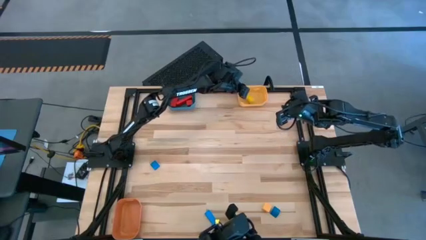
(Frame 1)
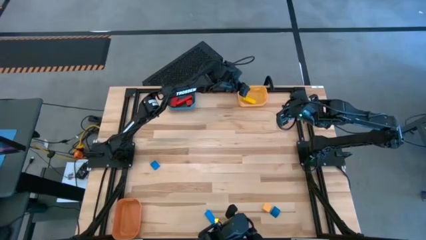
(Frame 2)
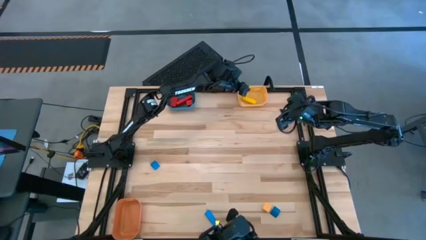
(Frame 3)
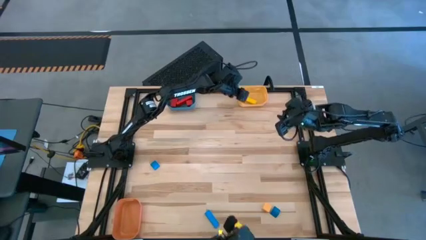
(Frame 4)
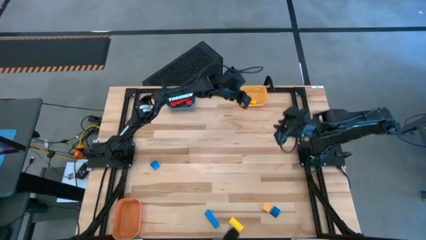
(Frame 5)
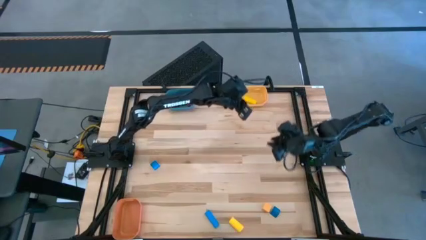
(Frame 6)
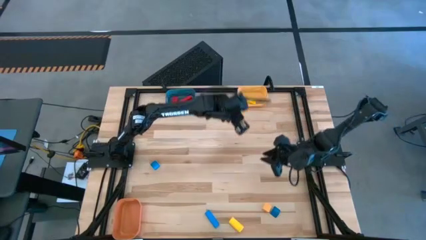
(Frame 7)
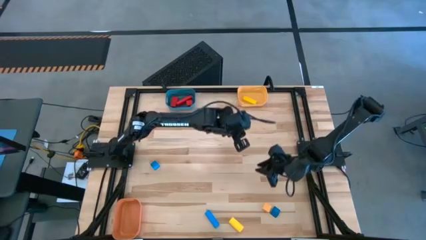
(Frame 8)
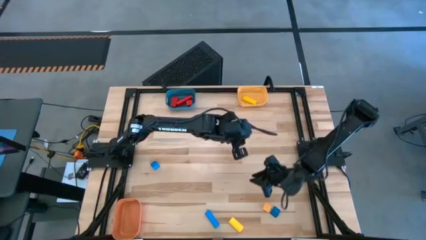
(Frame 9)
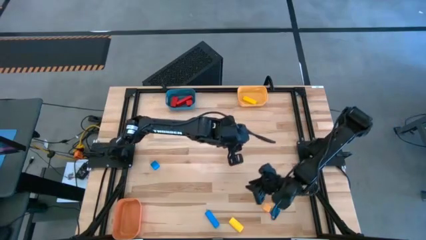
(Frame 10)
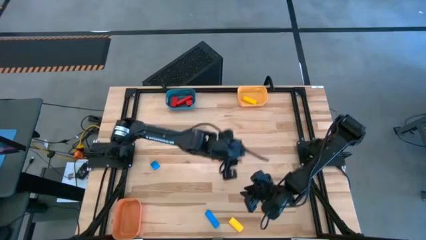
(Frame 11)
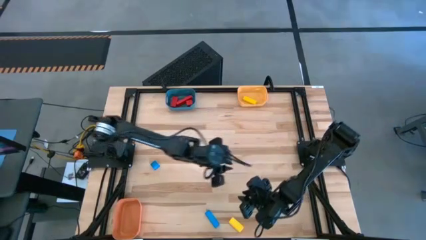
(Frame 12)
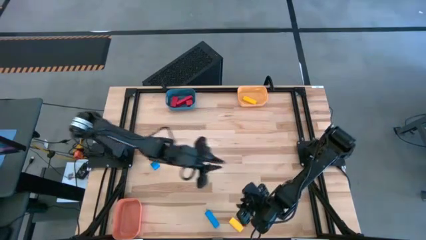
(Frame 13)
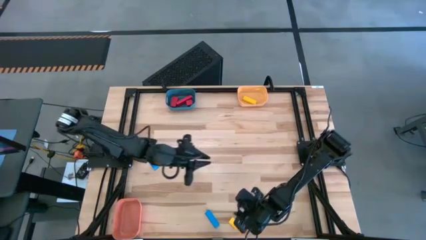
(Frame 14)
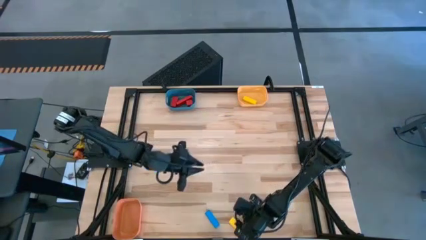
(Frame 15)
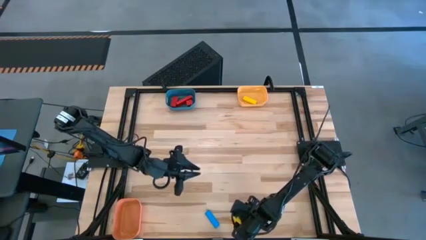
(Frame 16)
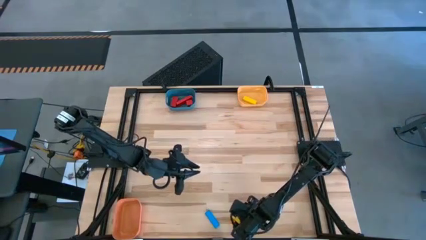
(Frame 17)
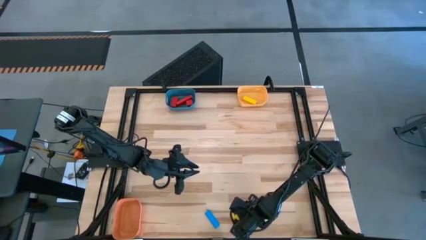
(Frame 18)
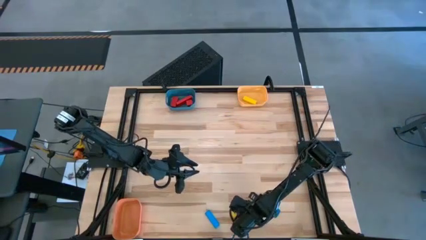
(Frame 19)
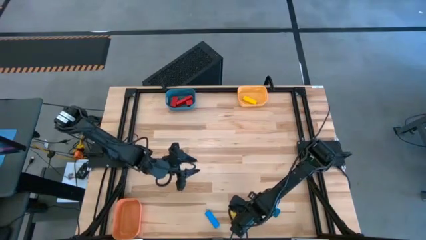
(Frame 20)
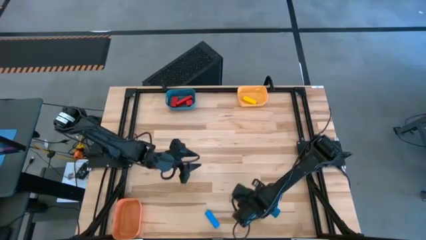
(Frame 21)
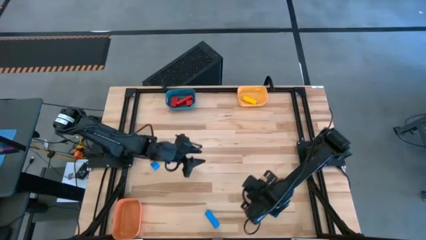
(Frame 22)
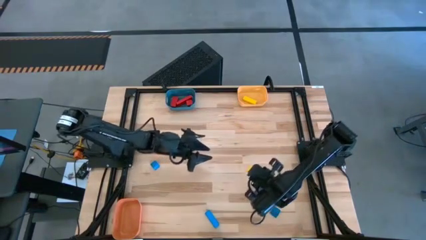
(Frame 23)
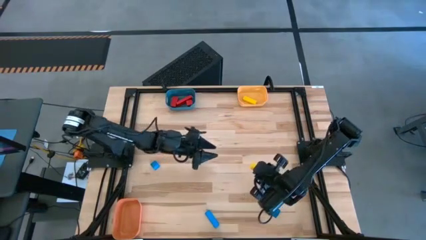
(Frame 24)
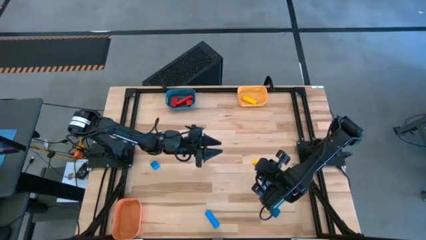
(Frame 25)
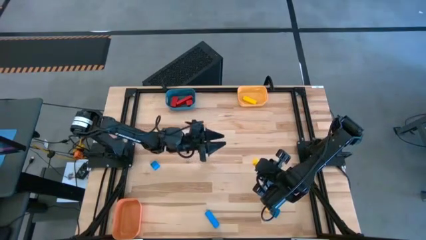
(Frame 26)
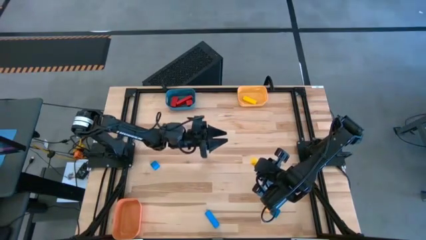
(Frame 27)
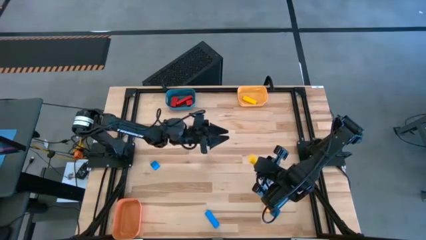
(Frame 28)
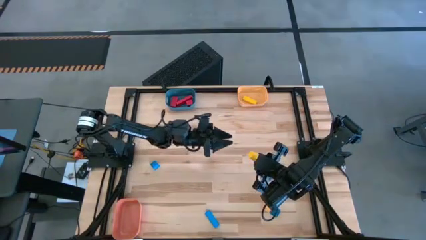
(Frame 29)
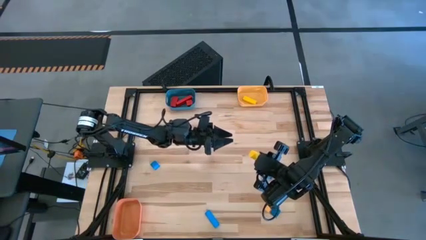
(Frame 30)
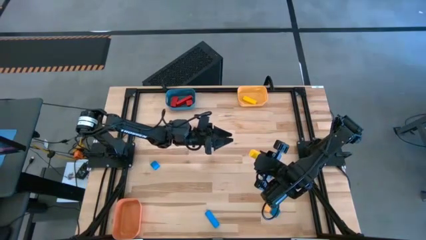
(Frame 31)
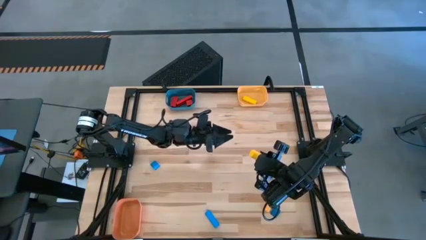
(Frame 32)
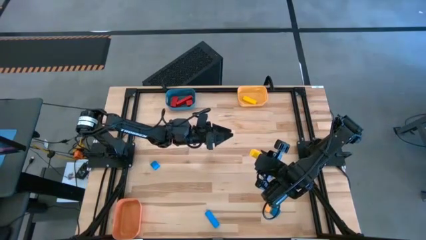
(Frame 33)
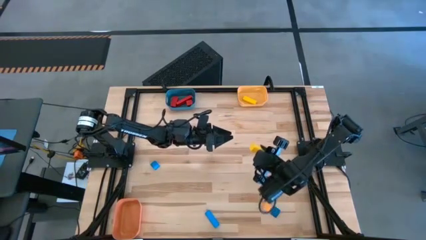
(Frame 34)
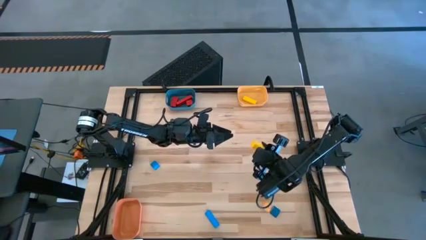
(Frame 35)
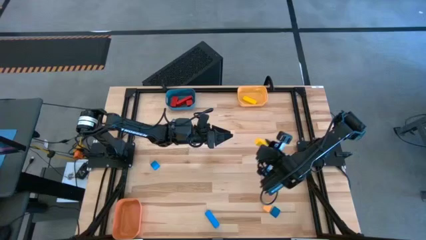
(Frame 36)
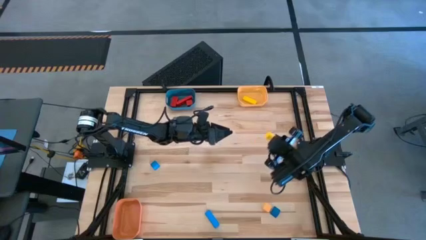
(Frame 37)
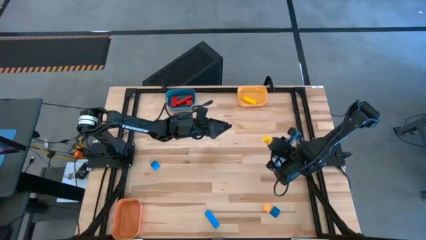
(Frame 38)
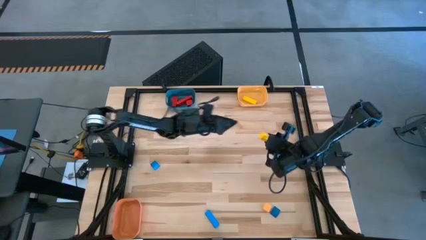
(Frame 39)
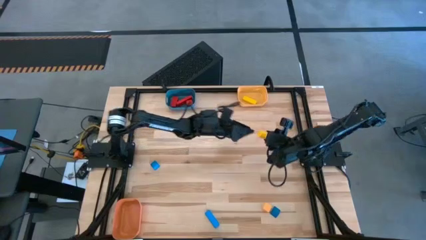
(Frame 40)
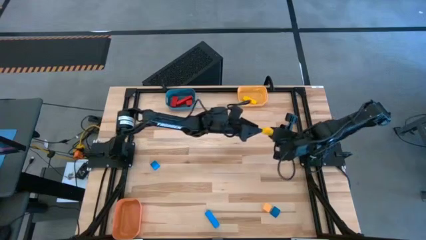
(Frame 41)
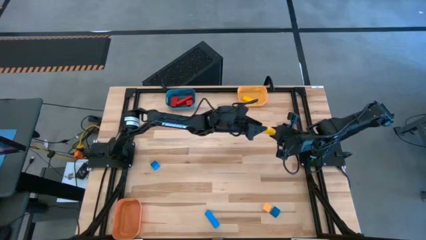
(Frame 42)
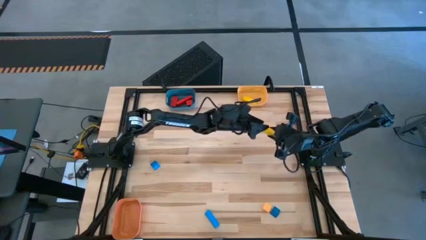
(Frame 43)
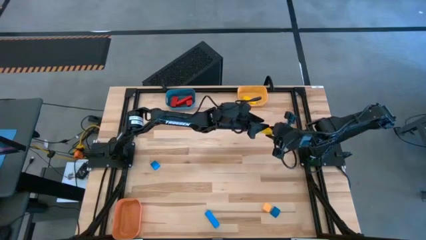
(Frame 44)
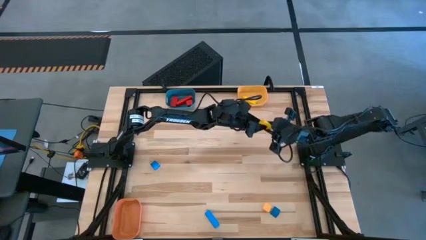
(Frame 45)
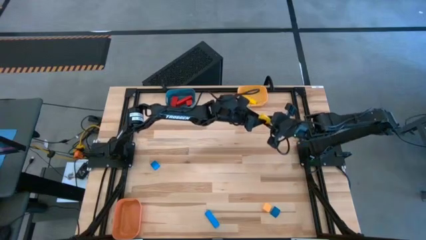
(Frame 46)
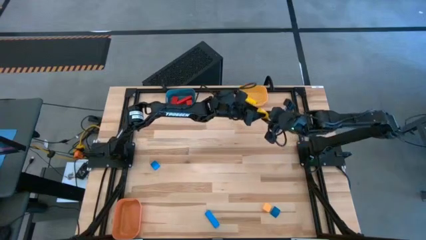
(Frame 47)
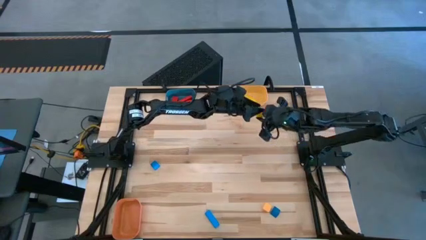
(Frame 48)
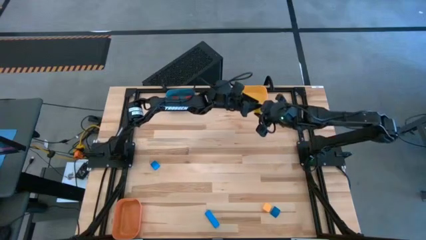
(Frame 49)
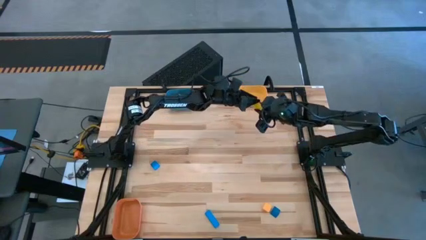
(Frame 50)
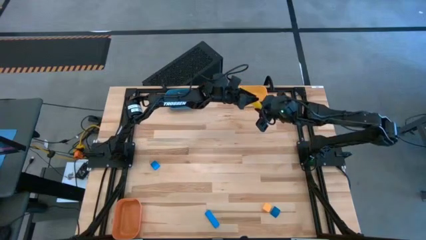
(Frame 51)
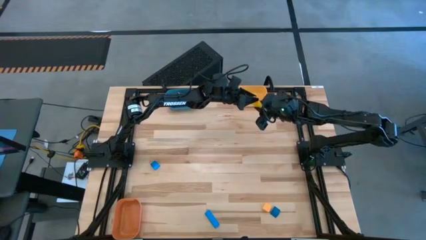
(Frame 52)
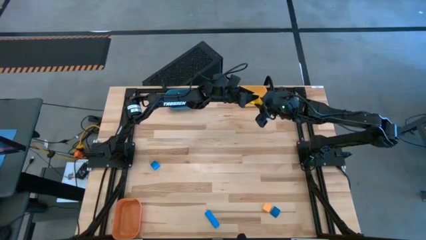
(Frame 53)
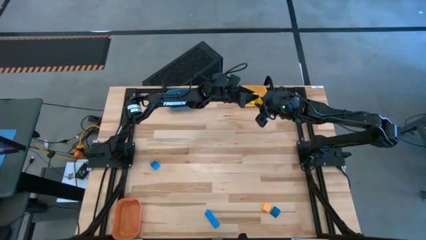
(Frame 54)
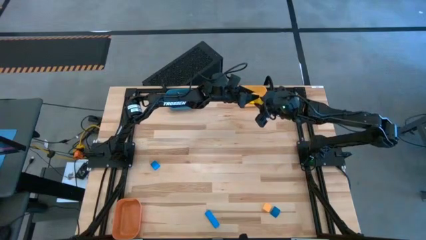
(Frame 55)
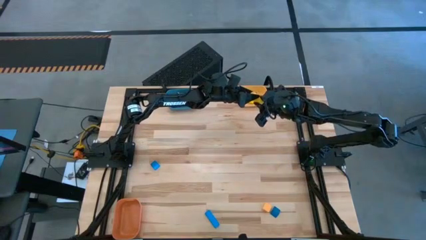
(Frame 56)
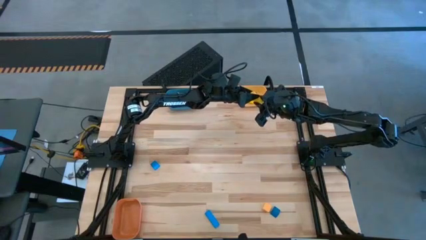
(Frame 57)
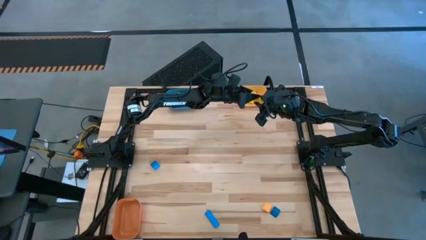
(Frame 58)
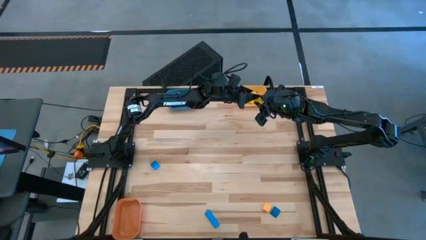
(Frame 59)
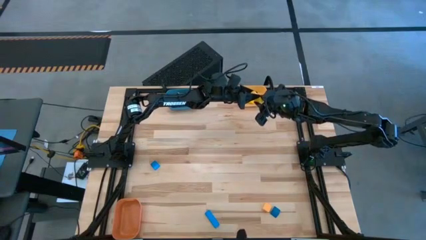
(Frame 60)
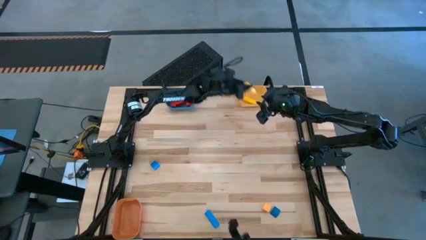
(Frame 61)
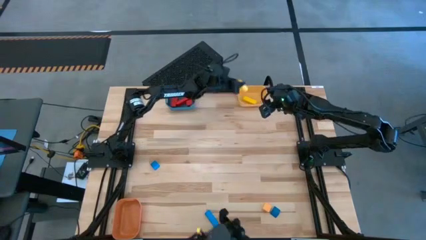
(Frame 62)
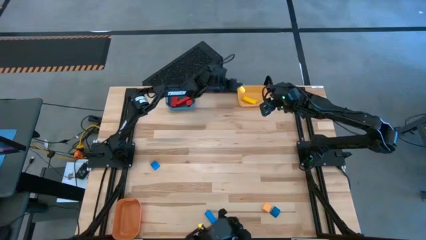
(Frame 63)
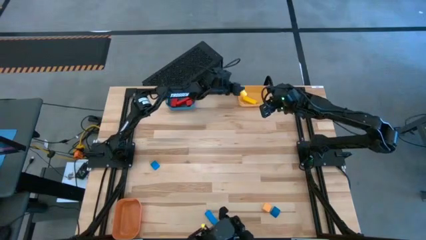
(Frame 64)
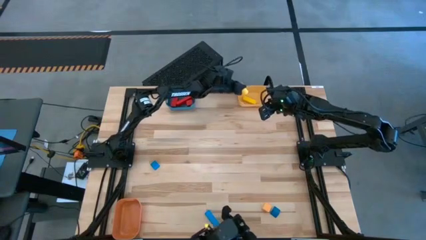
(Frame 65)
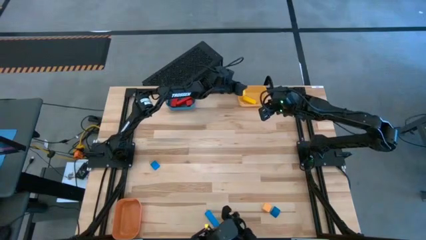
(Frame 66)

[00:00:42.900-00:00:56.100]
Task: Sort & place blocks by color
Put the yellow block into the yellow bin

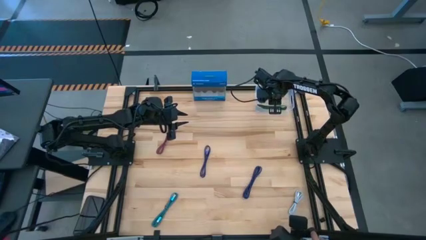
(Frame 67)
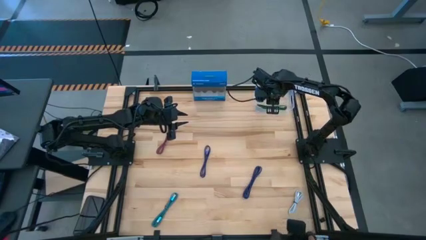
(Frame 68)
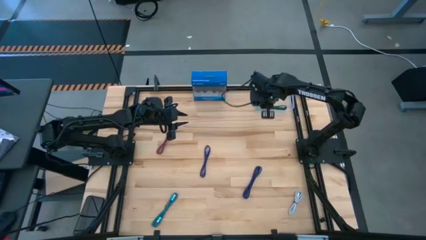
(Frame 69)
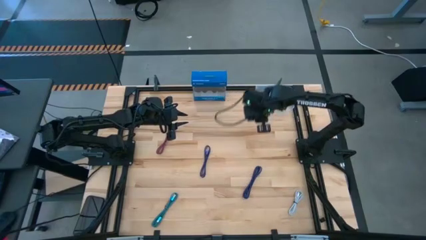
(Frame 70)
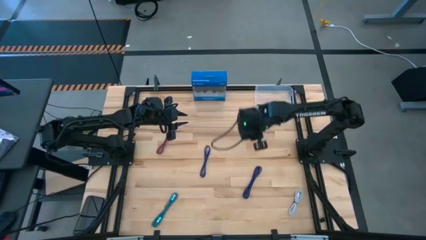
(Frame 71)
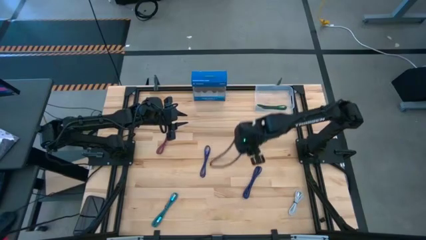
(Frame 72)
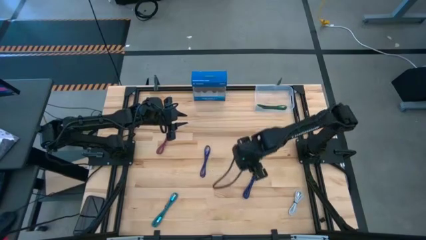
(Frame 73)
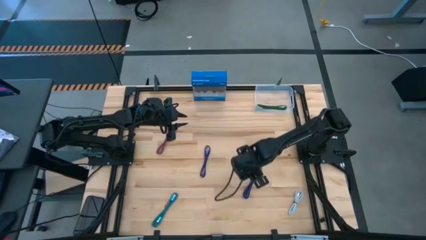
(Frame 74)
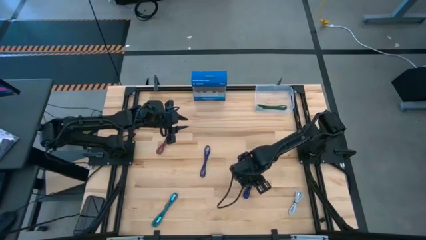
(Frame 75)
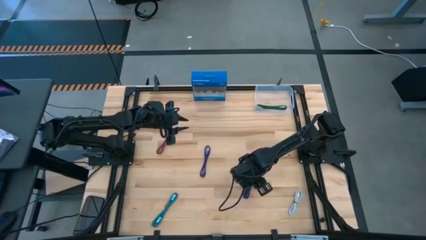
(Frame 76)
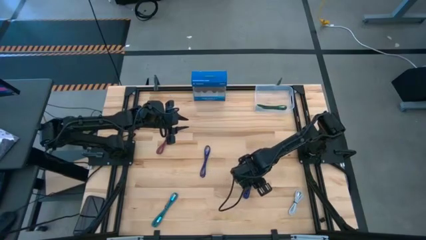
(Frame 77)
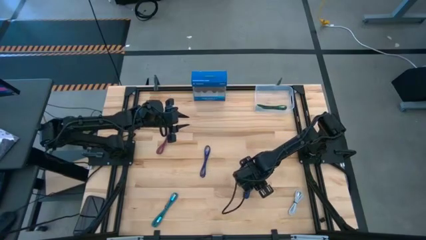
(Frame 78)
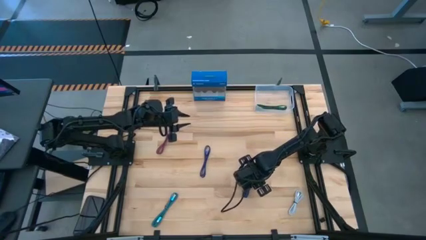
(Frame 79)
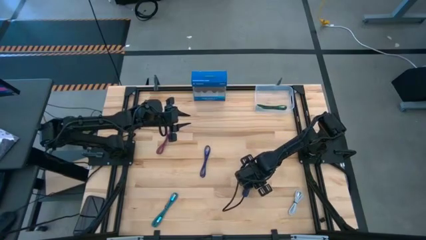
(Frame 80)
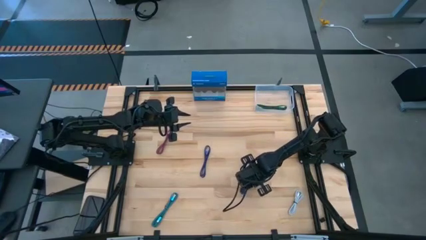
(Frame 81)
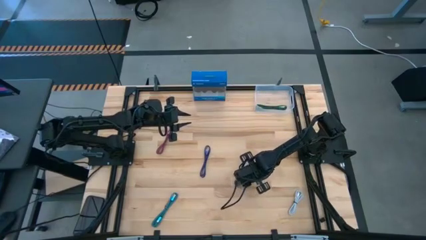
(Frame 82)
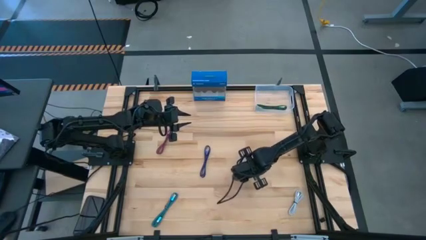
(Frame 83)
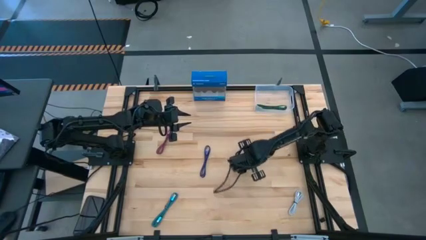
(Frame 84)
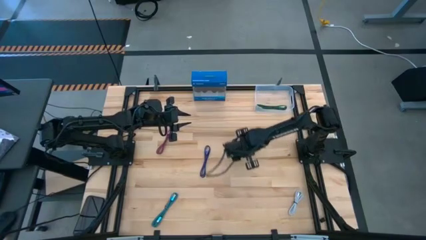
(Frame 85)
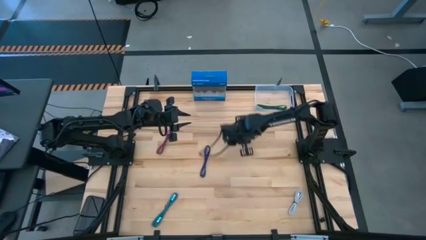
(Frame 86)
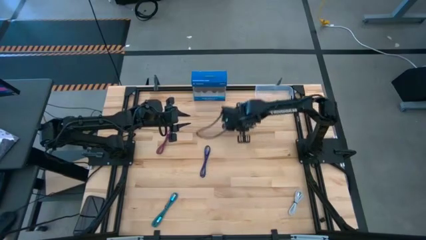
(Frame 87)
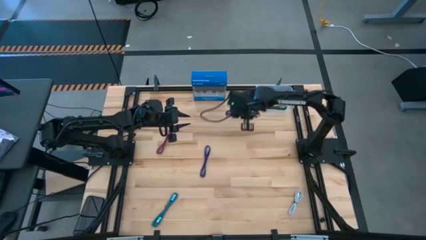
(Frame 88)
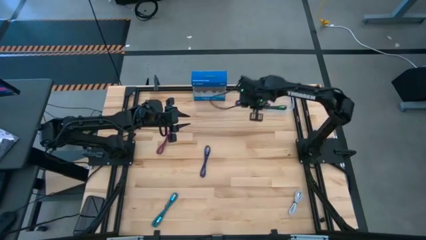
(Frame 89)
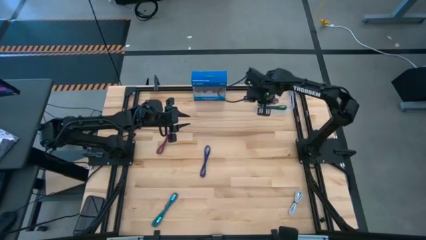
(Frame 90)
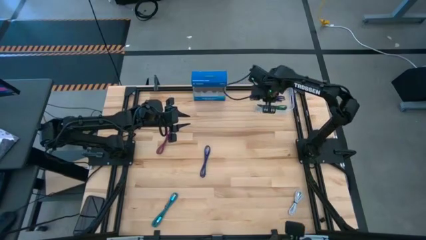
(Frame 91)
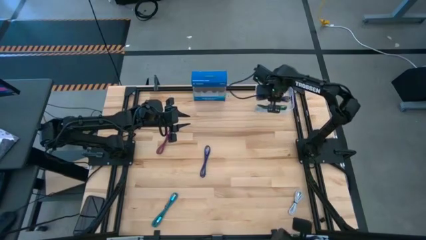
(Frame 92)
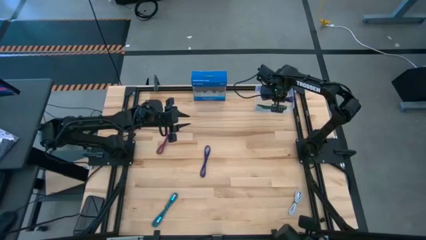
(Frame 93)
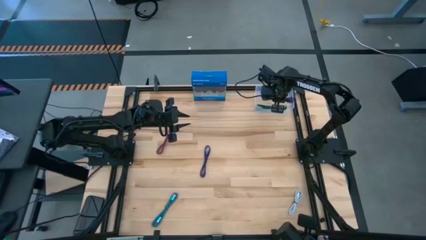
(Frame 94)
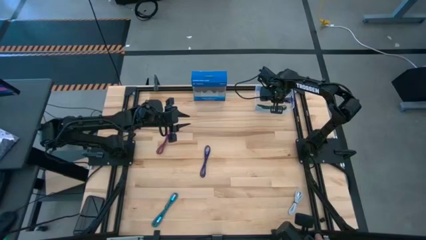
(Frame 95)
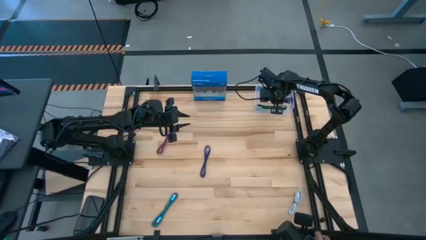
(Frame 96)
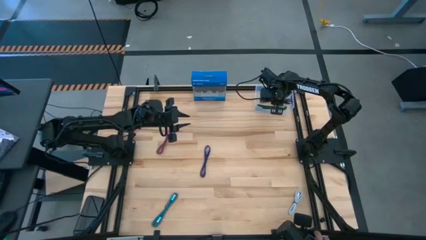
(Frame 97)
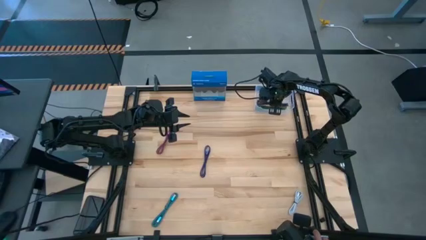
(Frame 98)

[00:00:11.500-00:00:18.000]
Task: Pick and place USB-C Cables
Put the bottom blue charger cable into the bin
